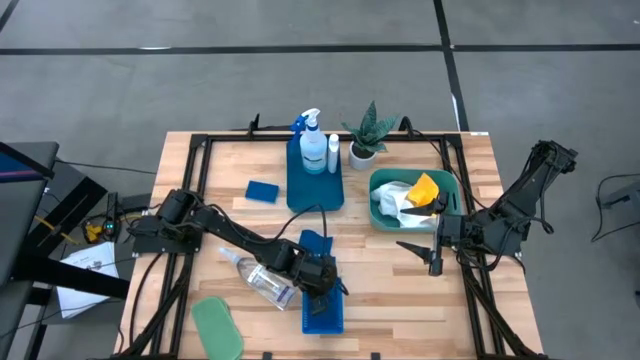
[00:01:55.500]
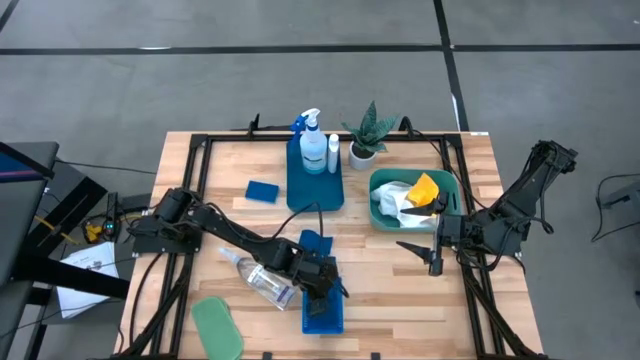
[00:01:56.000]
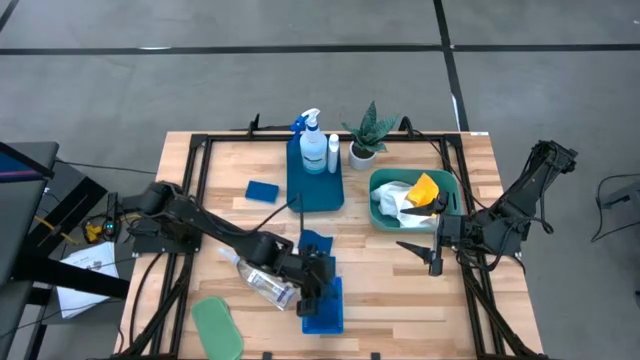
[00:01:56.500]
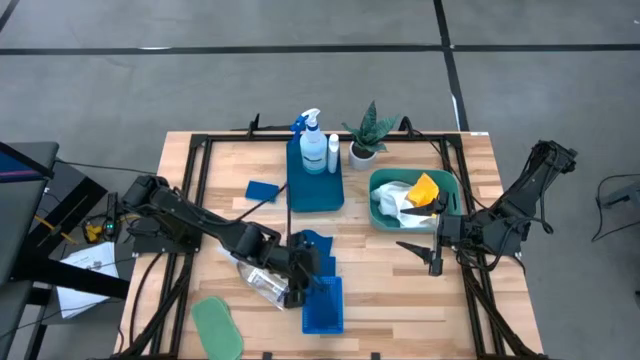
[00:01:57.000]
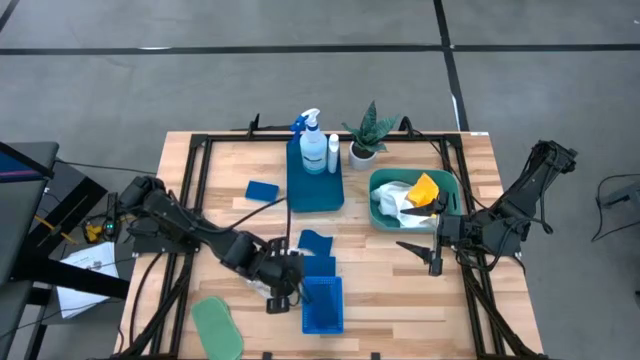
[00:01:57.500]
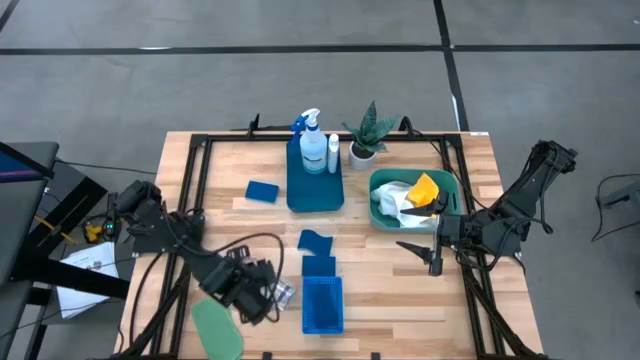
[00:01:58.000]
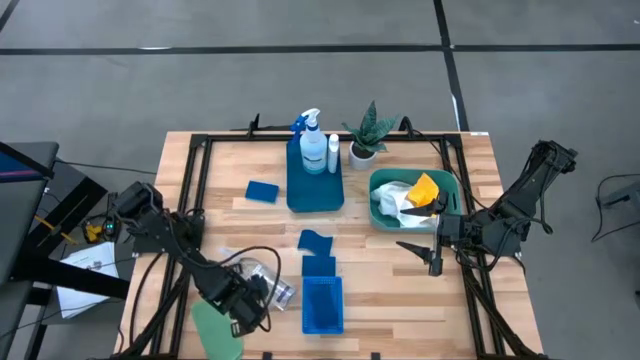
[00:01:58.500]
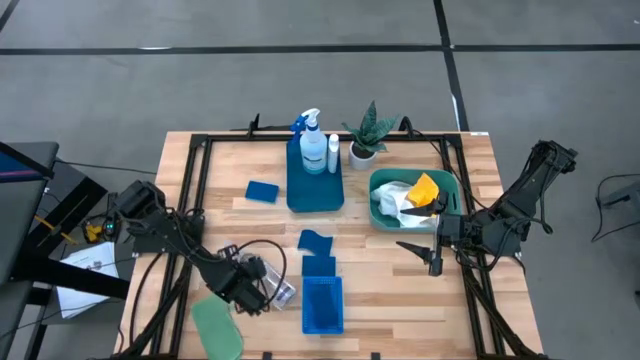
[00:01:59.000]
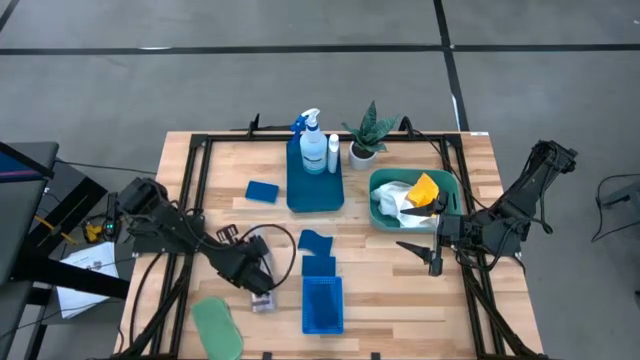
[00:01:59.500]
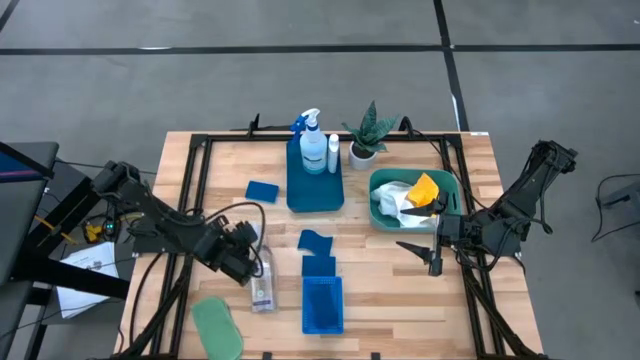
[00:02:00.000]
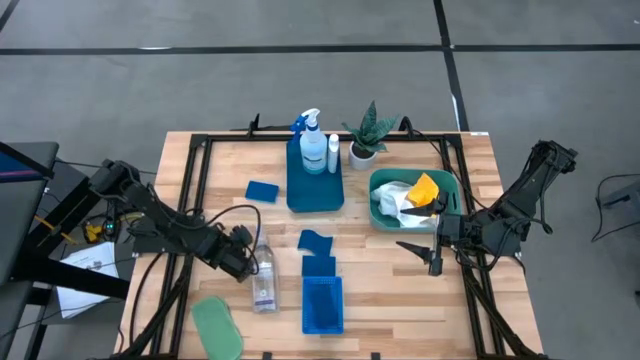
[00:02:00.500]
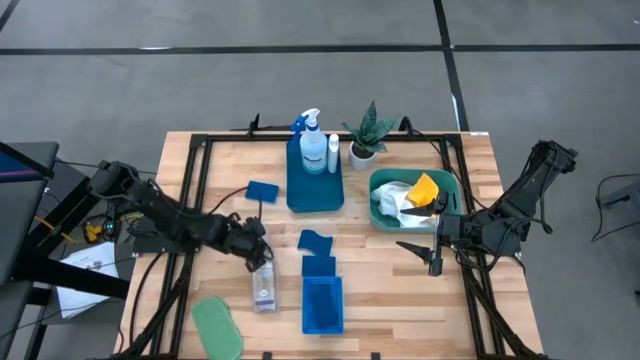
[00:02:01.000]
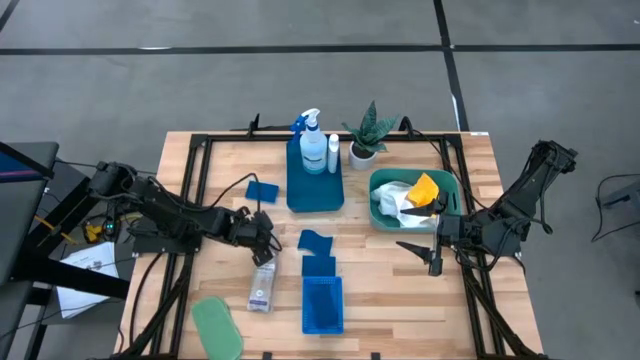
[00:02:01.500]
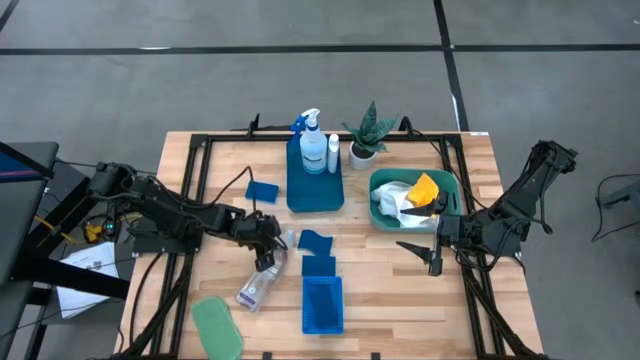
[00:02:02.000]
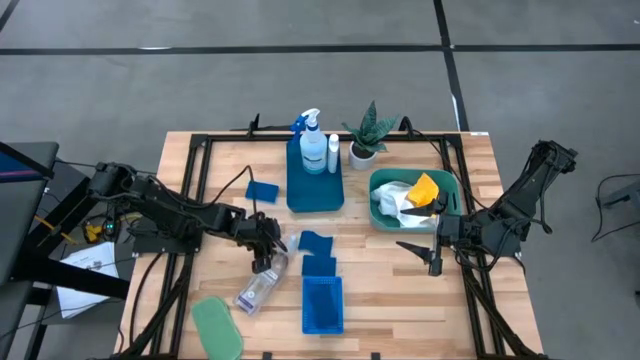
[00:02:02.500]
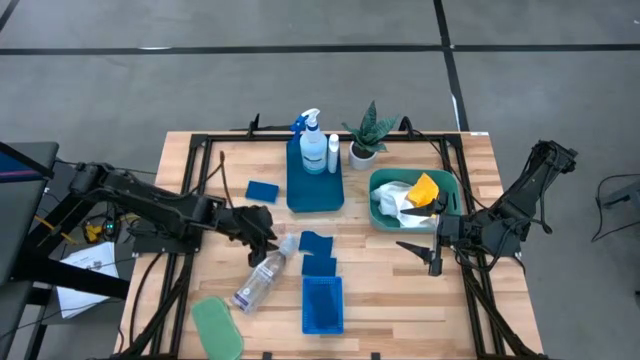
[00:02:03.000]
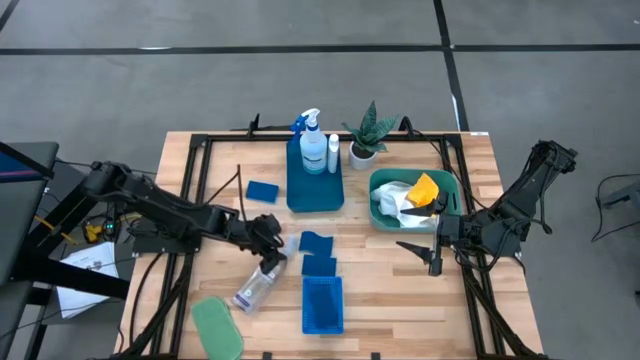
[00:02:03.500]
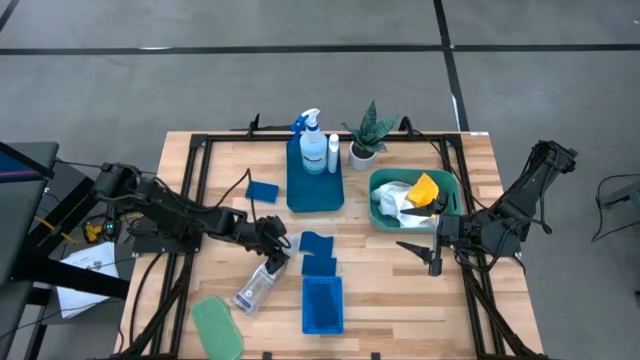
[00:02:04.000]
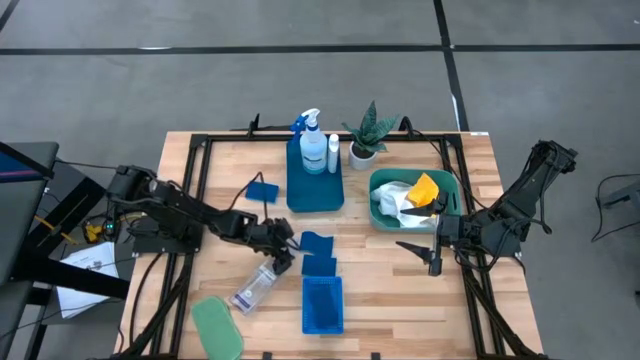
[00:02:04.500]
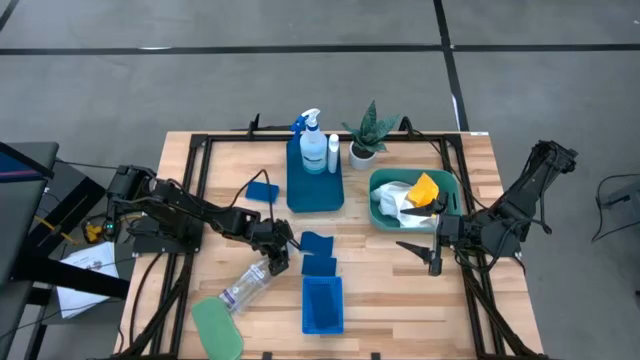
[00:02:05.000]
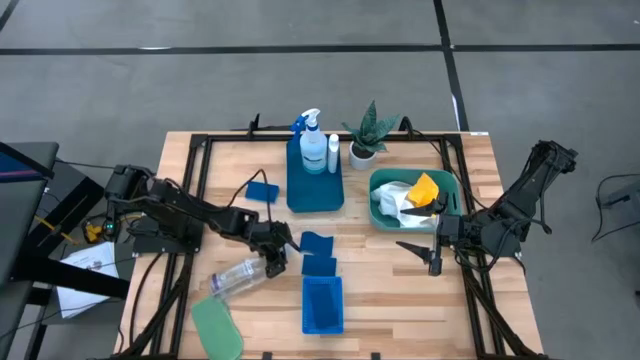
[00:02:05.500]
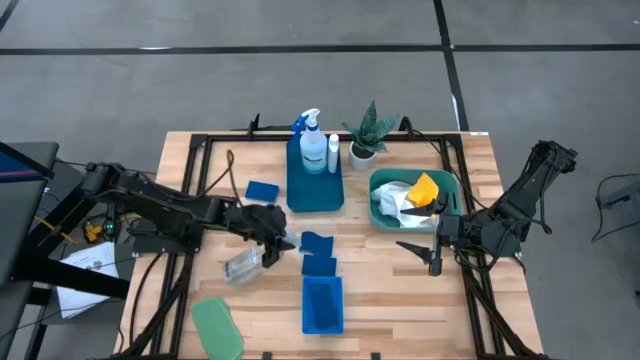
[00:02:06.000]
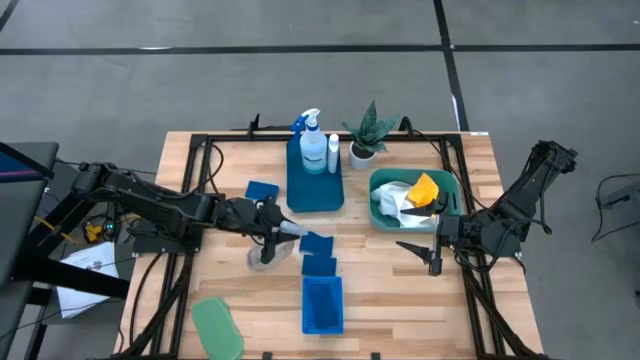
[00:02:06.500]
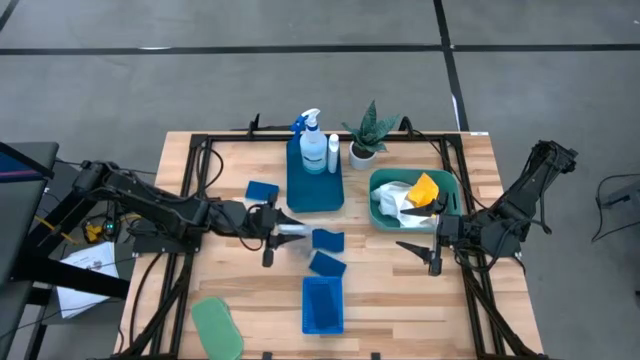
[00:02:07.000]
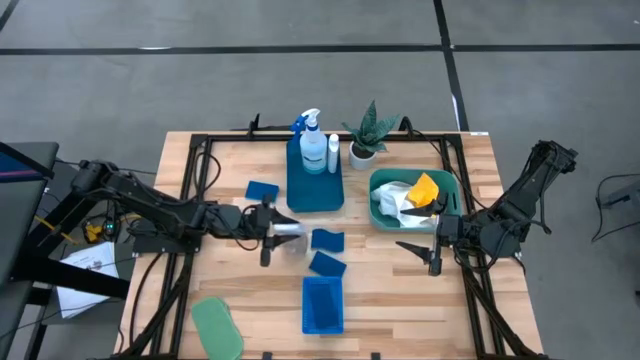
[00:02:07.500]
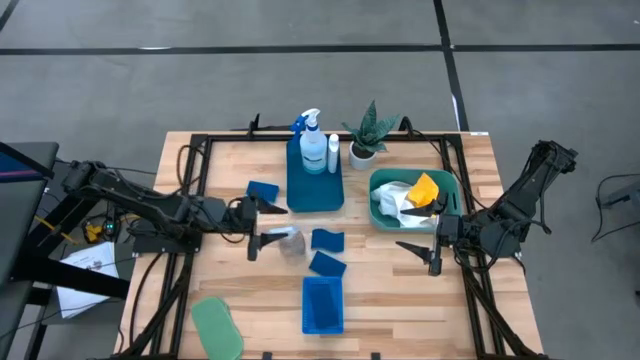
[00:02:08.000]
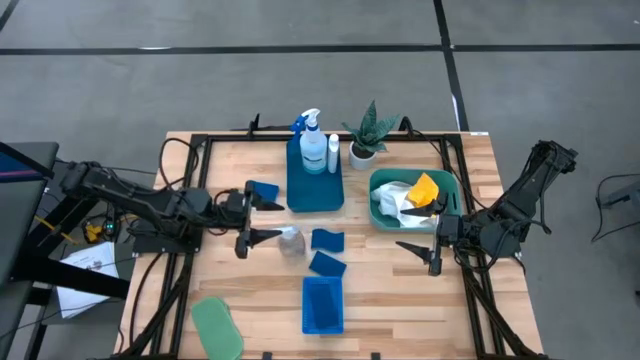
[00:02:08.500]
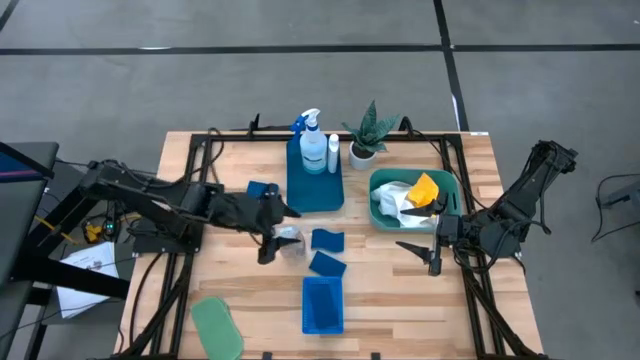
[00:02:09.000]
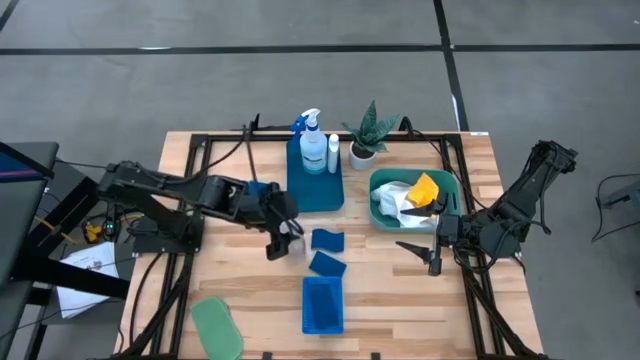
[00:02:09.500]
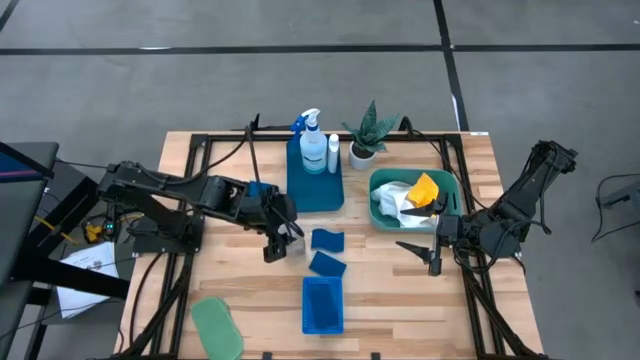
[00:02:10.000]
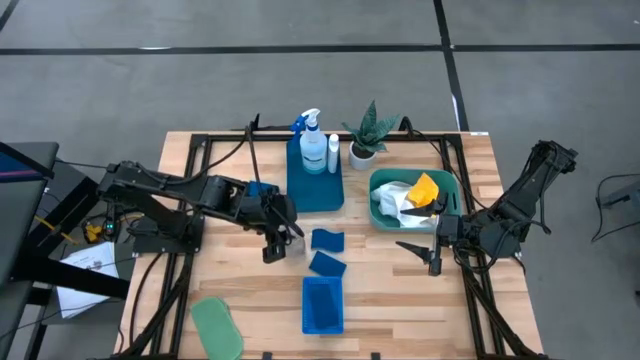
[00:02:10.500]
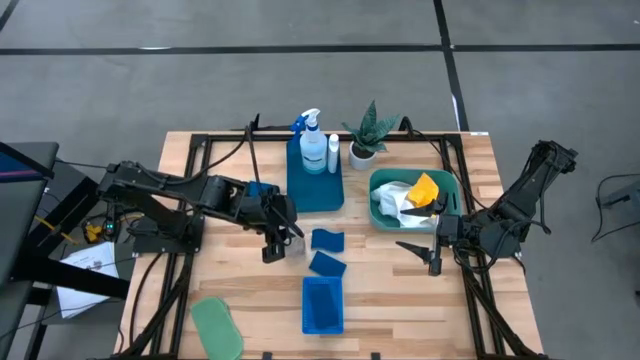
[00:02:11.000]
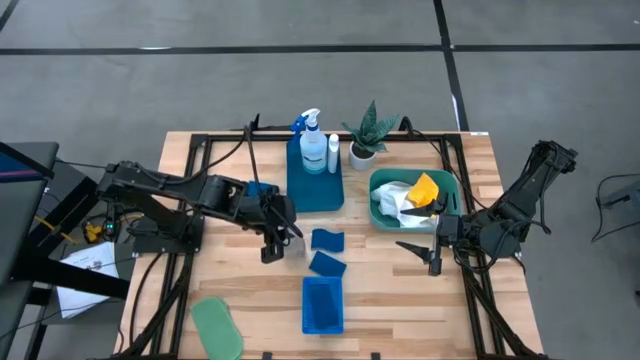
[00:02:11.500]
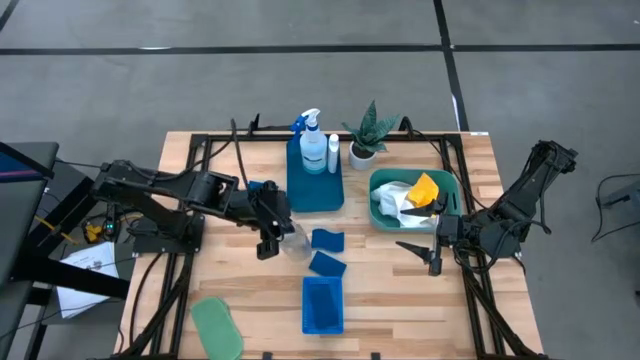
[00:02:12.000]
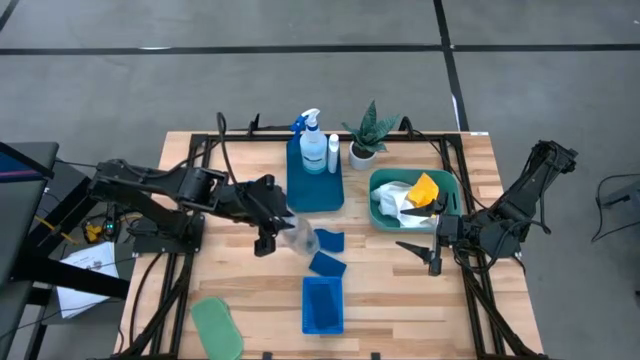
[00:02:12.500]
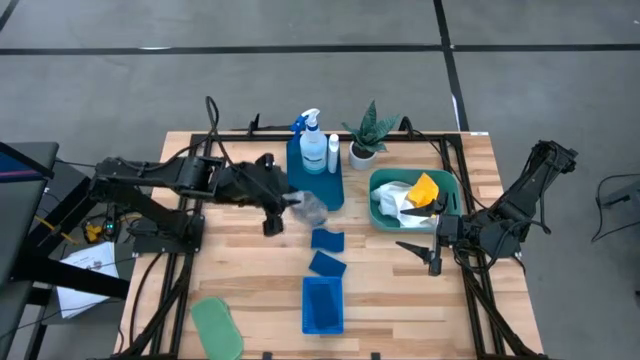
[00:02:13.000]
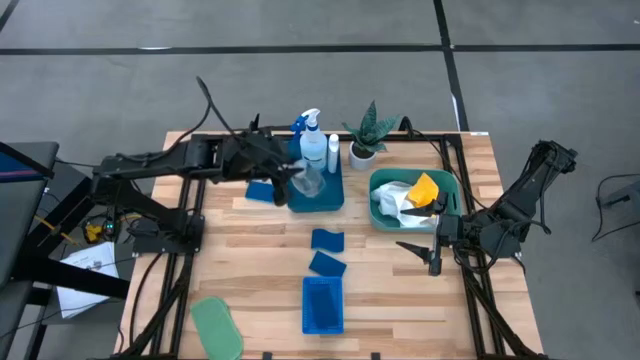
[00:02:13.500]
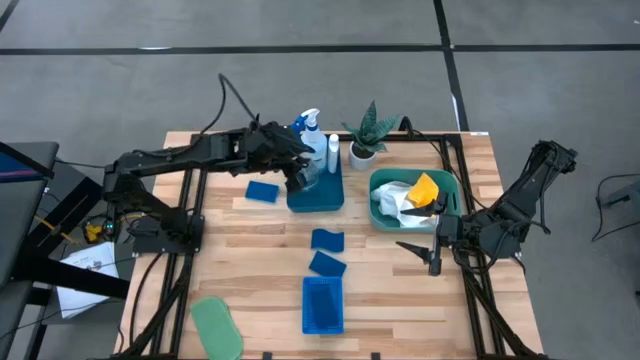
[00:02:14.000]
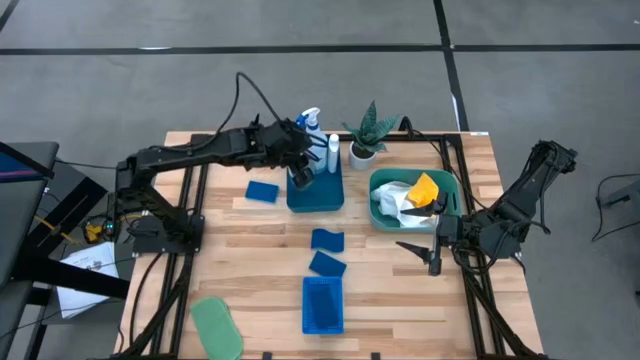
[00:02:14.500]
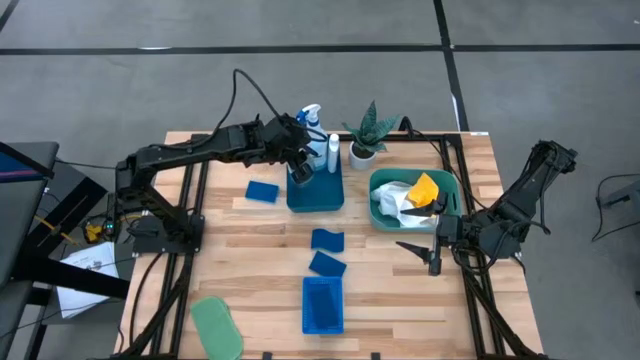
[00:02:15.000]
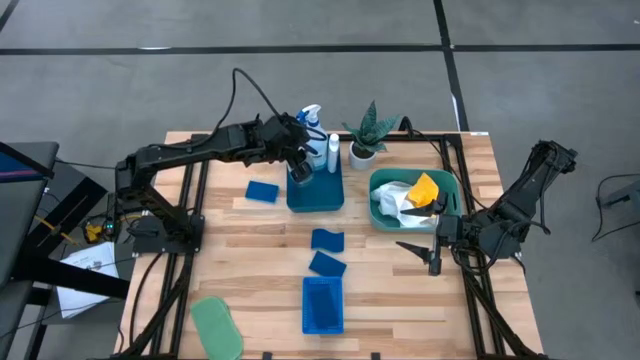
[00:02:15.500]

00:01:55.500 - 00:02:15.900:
Task: Pick & Place Kitchen Items
Put the transparent spray bottle into the blue bin

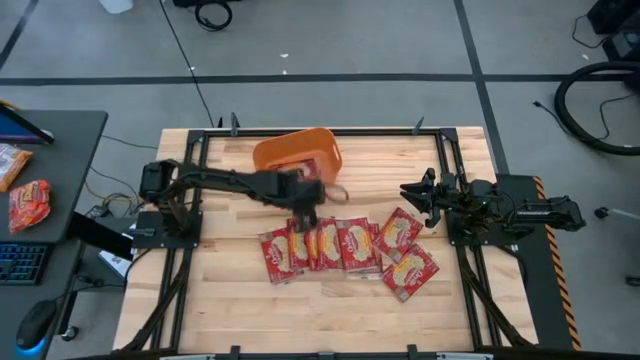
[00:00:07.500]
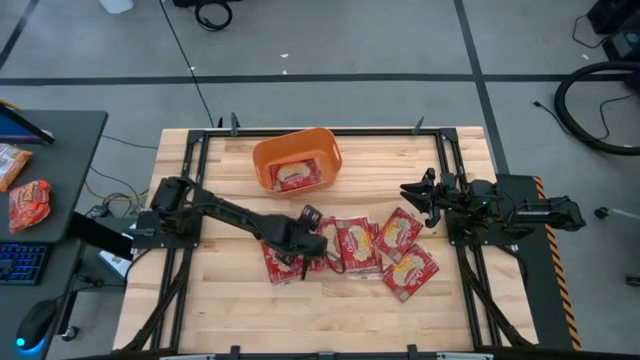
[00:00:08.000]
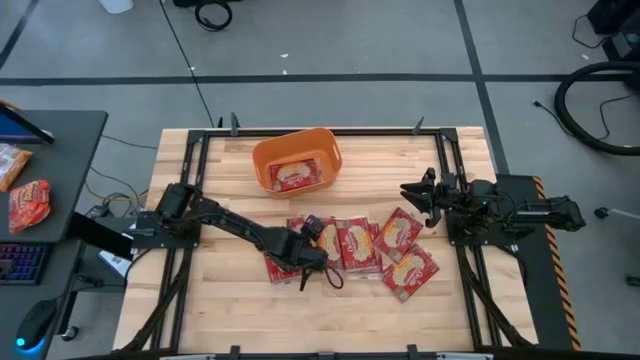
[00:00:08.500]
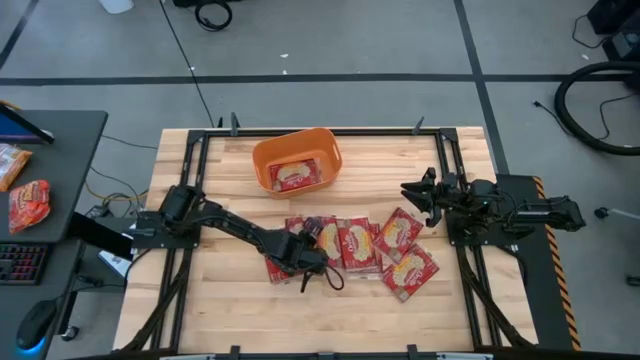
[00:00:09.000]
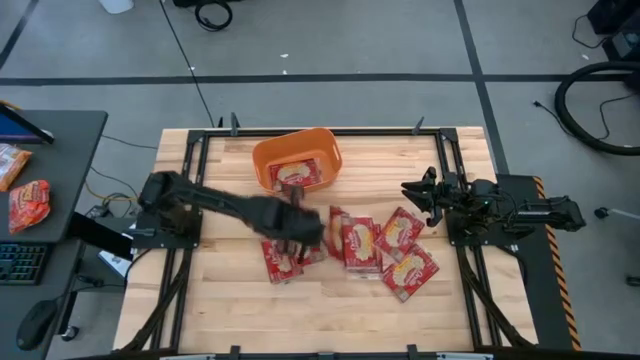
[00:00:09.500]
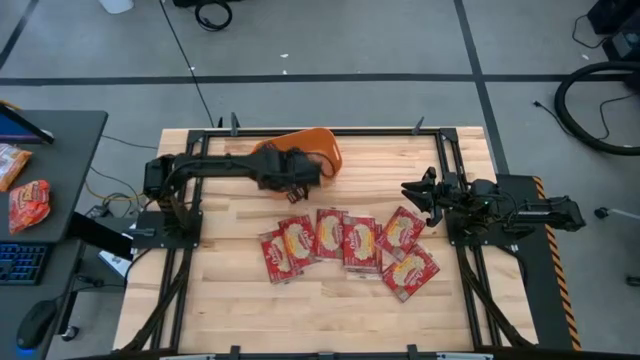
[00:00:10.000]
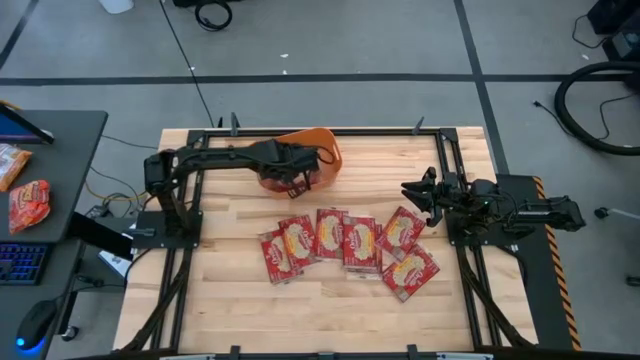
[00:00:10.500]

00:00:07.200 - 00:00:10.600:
Task: Sort popcorn bags into baskets
Put the red popcorn bag into the orange bin
